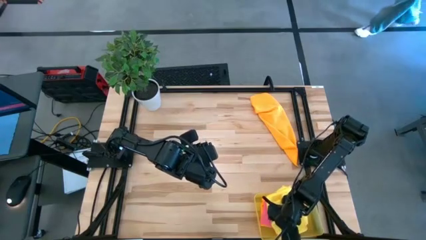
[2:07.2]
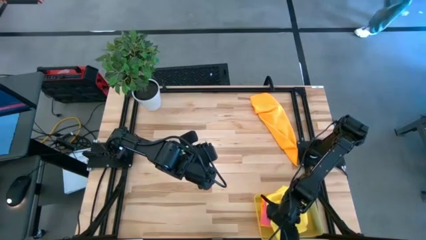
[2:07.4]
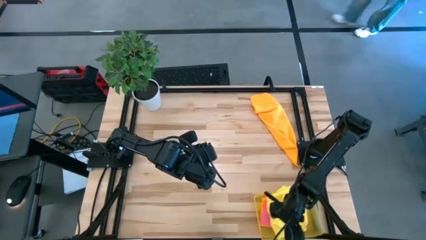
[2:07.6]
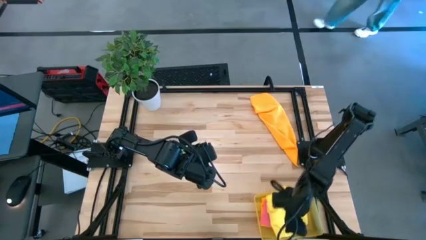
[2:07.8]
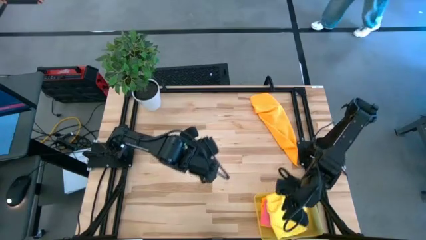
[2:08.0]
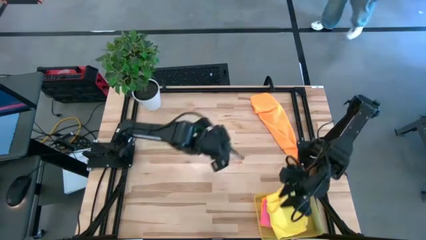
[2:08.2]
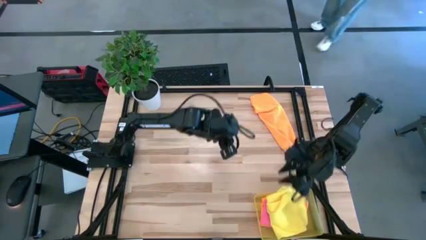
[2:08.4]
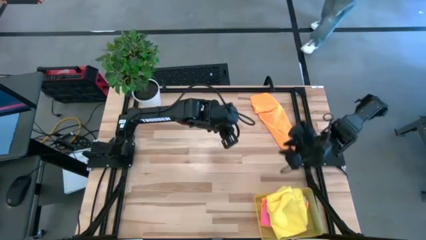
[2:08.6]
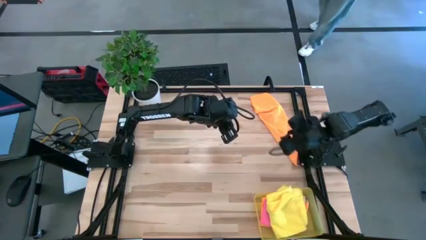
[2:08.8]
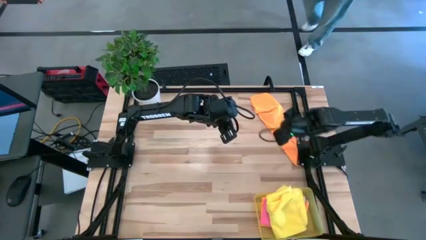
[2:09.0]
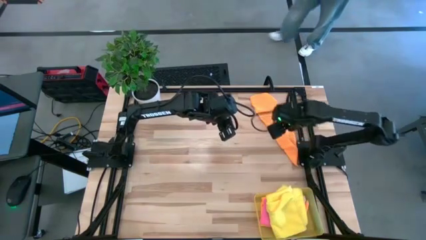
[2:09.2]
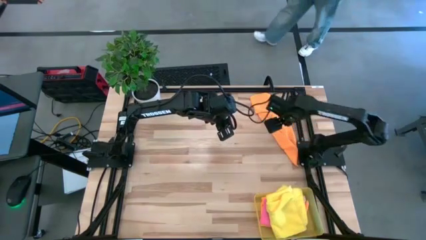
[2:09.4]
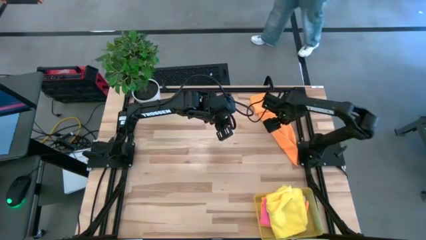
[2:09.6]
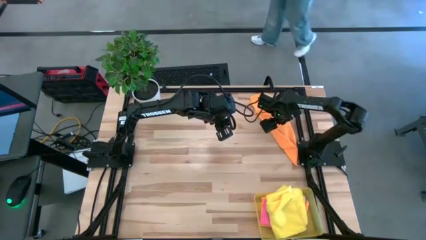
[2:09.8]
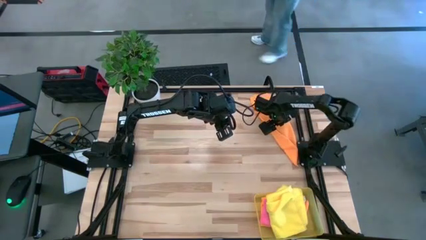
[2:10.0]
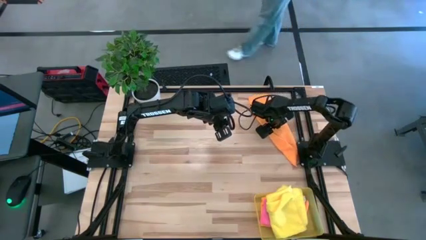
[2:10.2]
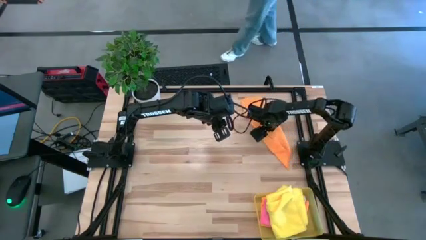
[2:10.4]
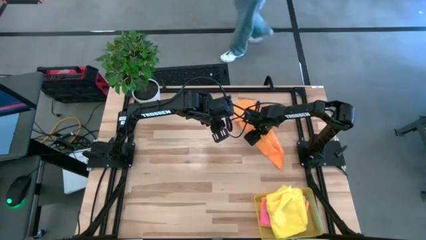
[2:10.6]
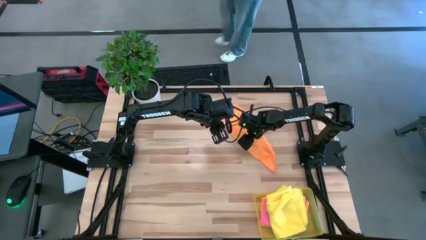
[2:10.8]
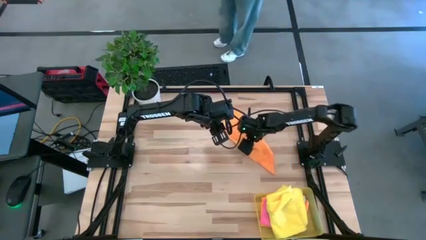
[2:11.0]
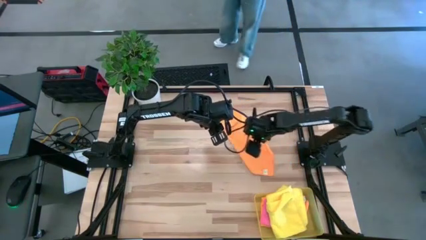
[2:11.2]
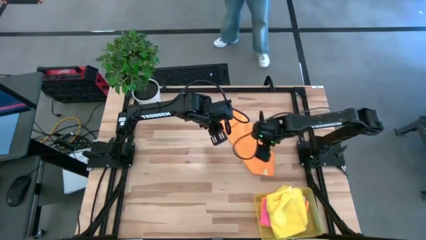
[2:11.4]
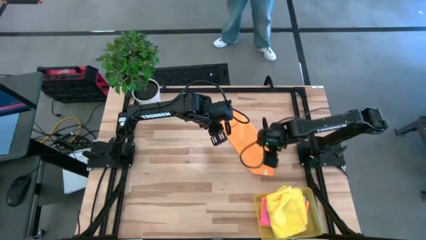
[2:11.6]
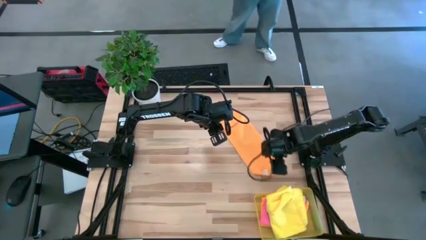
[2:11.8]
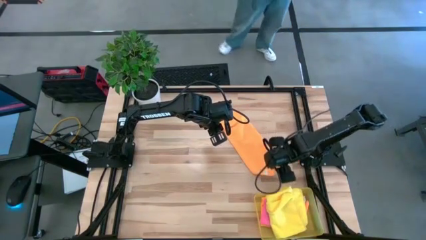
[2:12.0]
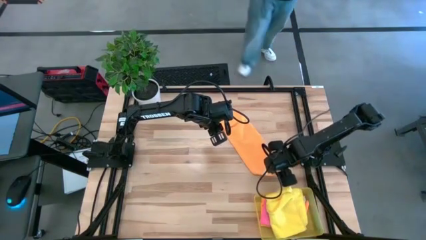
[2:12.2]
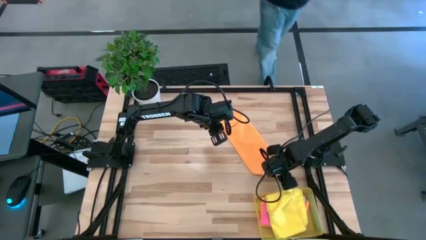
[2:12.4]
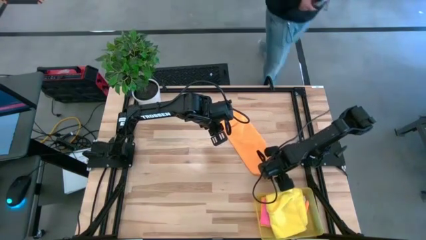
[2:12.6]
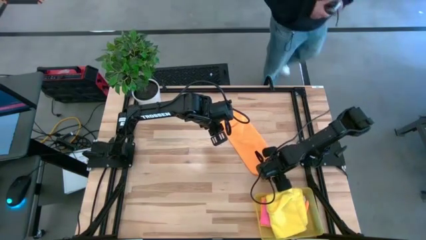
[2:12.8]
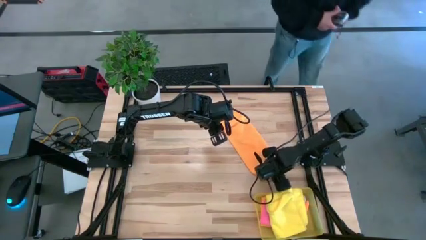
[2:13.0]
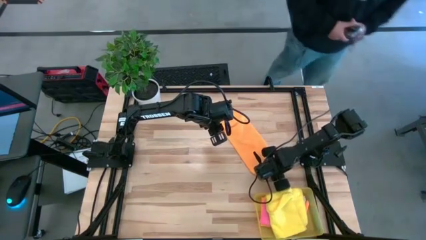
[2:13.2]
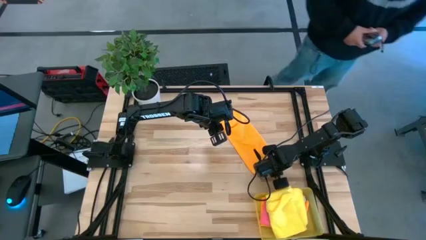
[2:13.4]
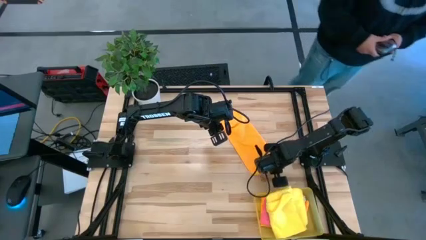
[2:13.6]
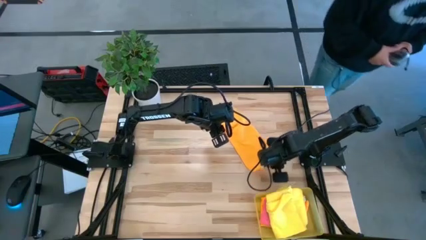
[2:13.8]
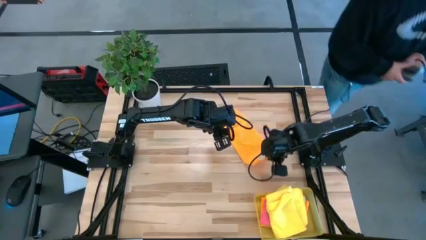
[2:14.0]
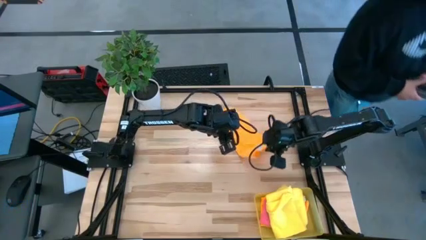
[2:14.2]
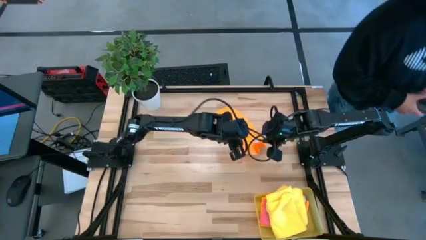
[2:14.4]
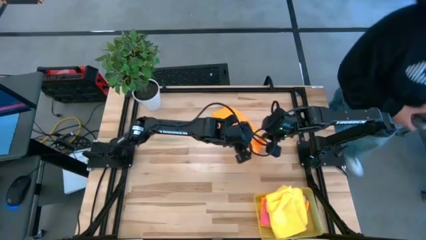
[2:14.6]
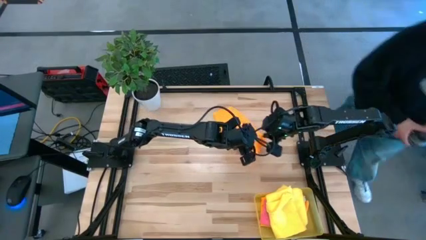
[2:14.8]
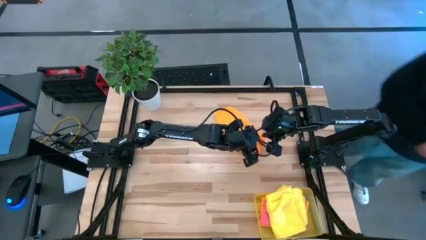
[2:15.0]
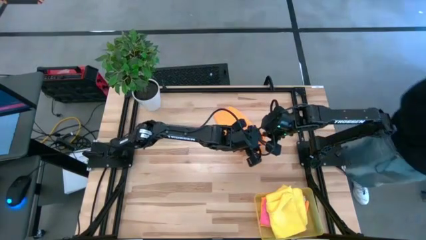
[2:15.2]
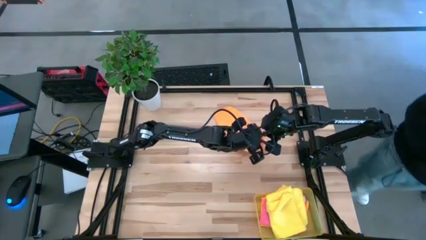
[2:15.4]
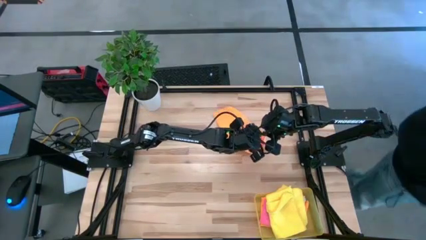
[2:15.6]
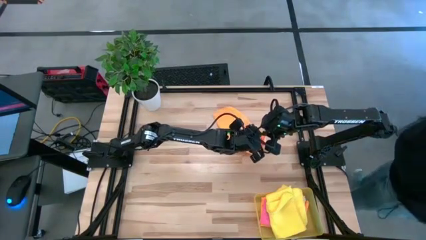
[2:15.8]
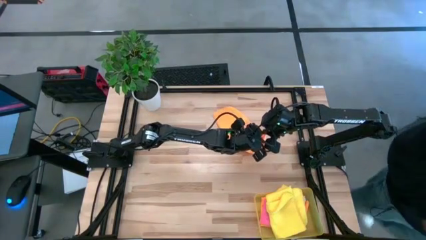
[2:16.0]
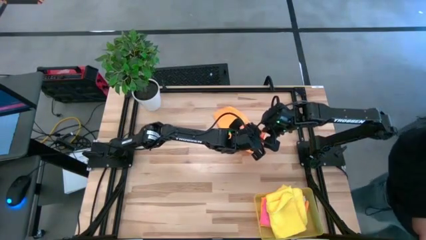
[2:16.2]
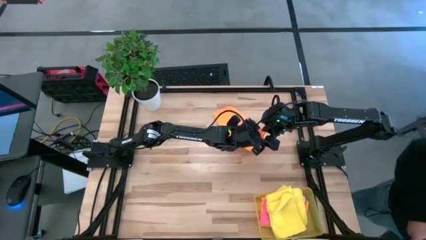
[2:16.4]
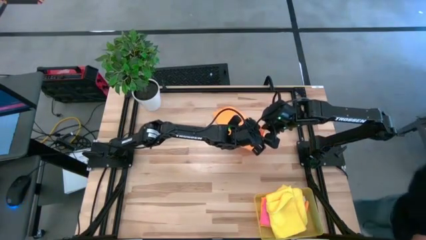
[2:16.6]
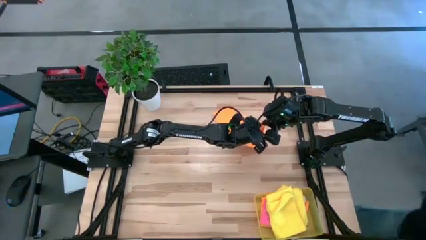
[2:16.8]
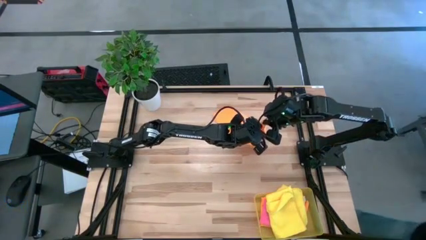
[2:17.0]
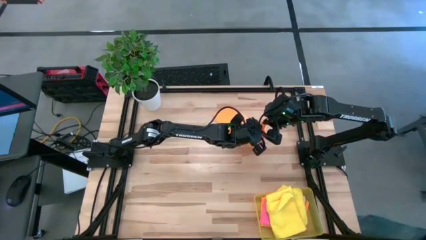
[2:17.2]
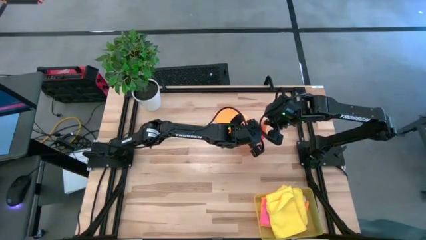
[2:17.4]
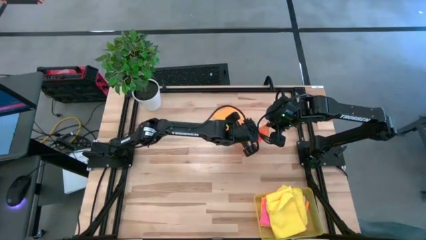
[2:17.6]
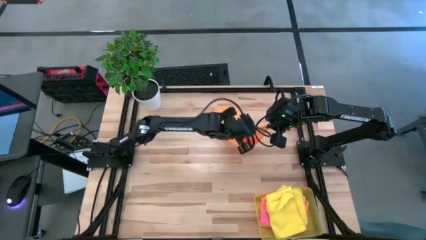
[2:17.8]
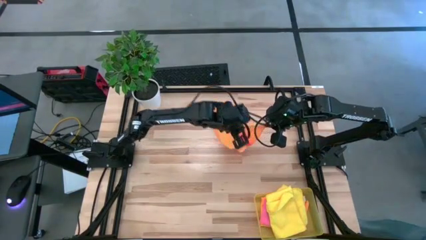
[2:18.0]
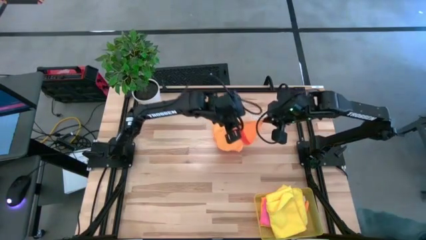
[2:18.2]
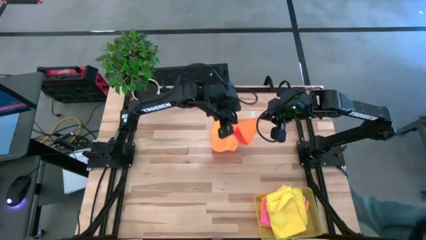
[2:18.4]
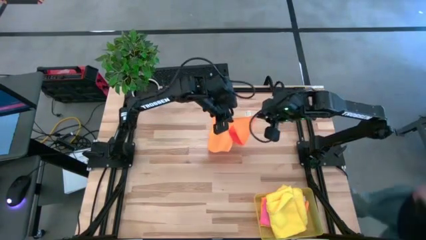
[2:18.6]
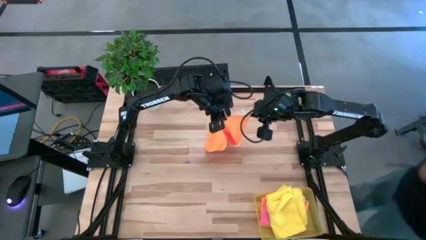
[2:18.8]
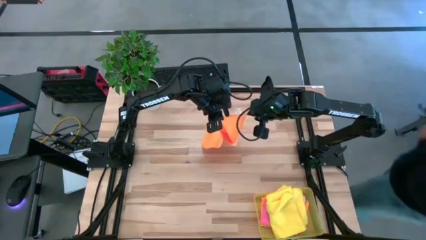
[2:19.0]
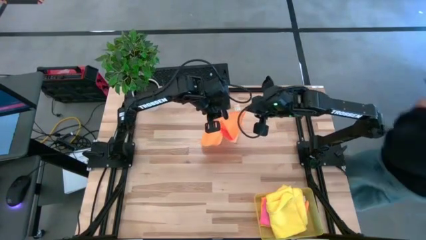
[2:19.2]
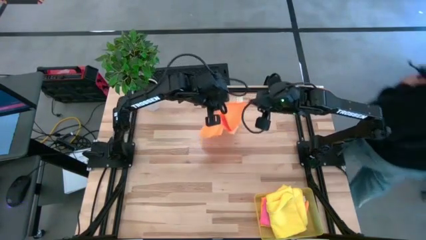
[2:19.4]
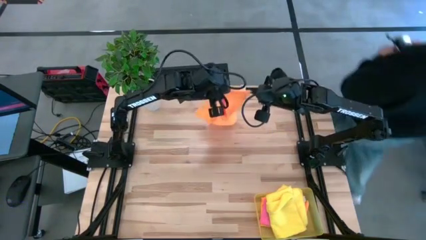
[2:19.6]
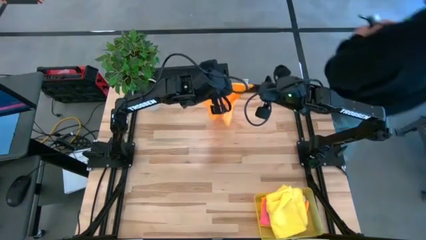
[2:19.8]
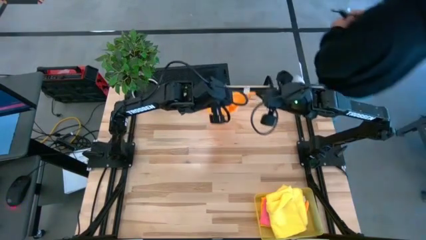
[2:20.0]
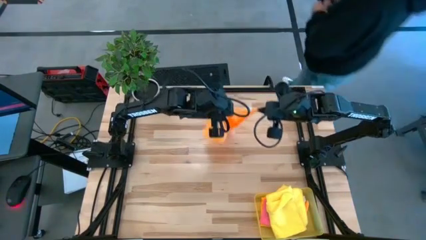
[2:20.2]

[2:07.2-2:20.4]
Task: Fold microfiber towels
Fold the orange microfiber cloth
